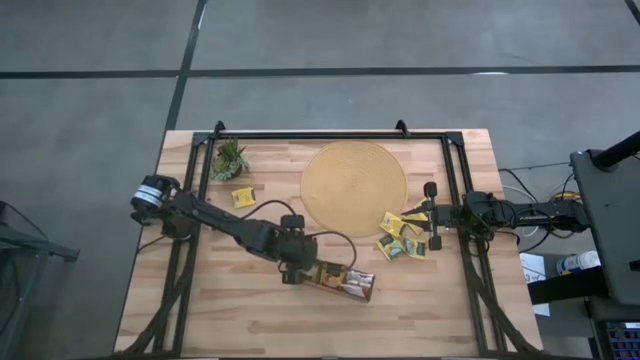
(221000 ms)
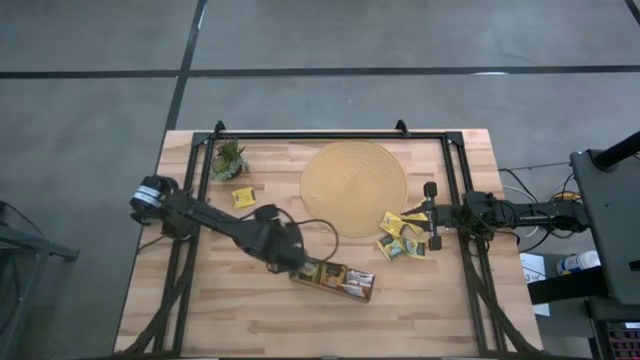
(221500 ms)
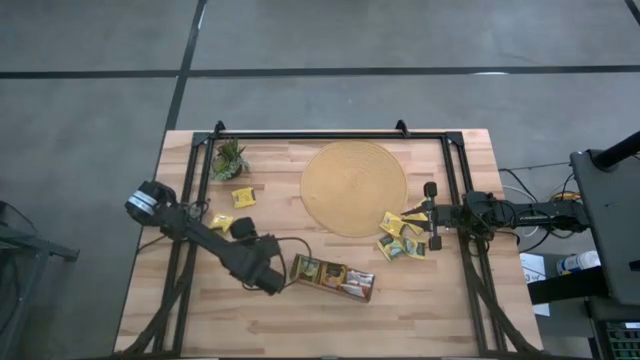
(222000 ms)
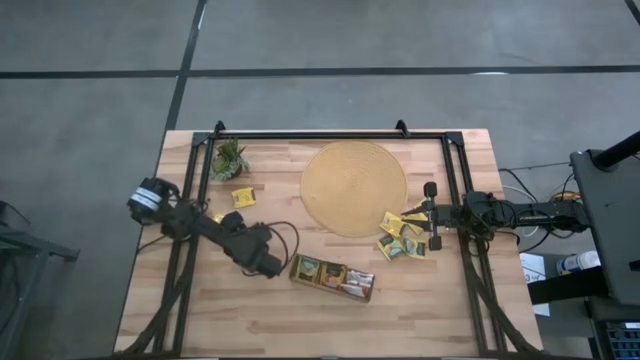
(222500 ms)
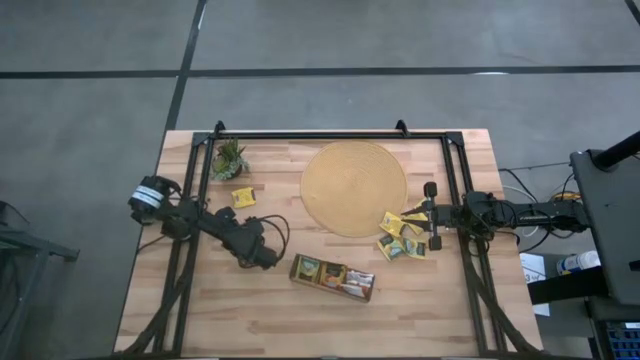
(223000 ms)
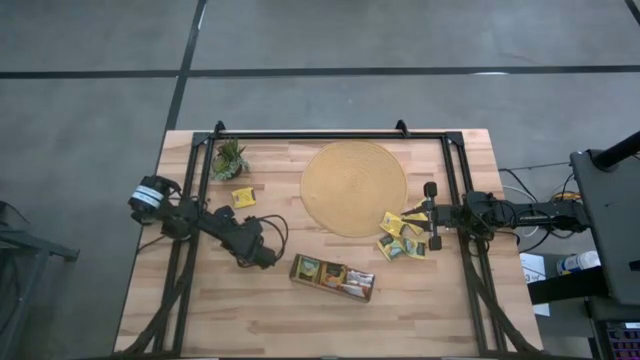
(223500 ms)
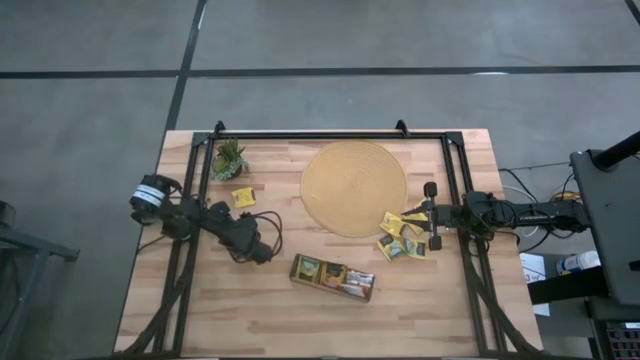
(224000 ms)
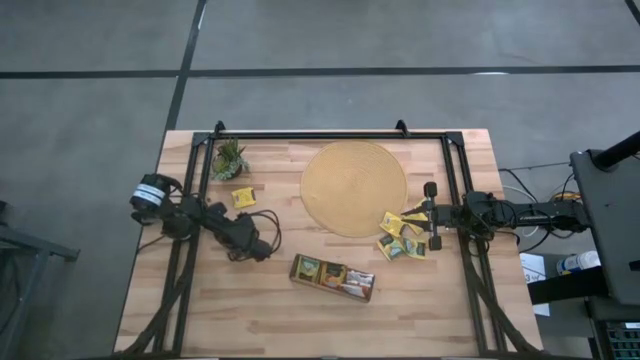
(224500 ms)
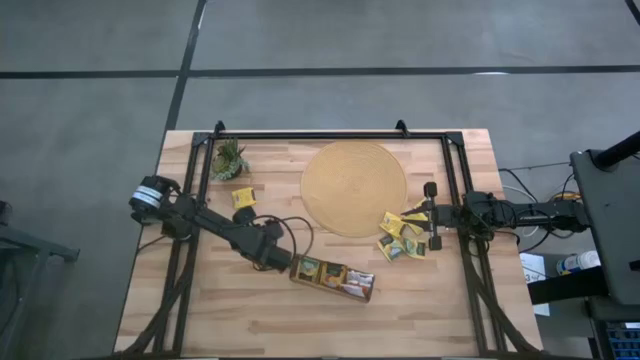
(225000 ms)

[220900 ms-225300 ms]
Task: Pick & Place Tea
Put the yellow tea bag into the left section of the wooden organizer

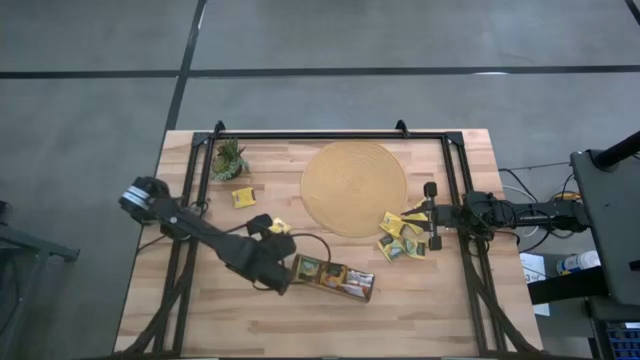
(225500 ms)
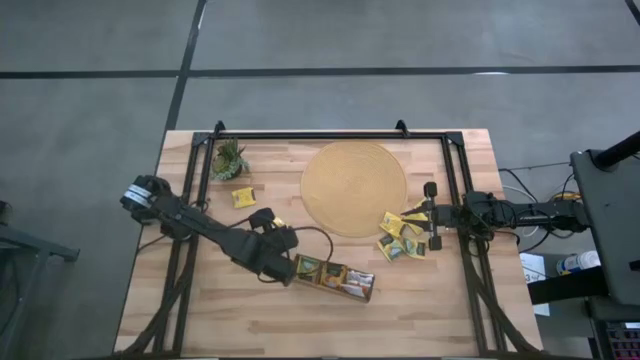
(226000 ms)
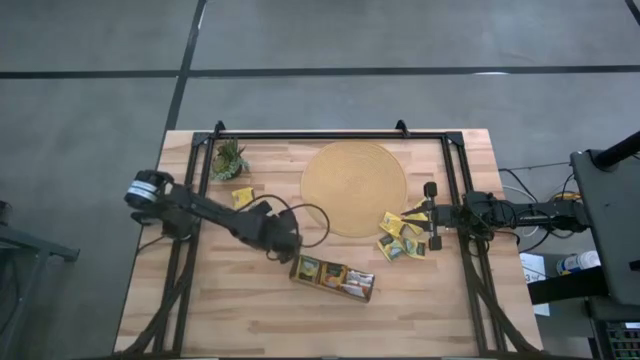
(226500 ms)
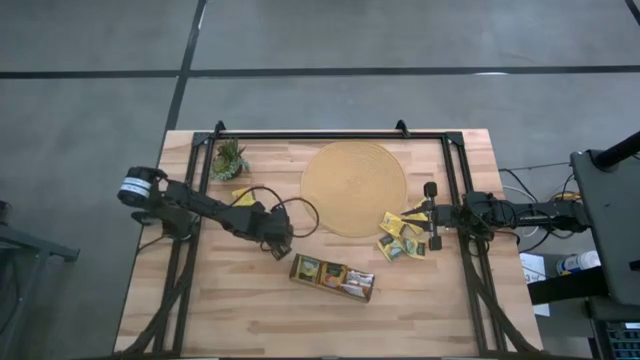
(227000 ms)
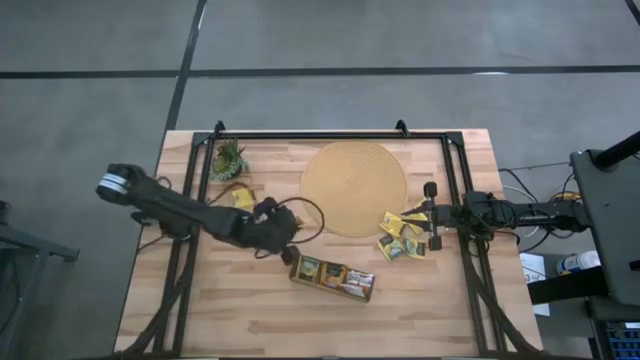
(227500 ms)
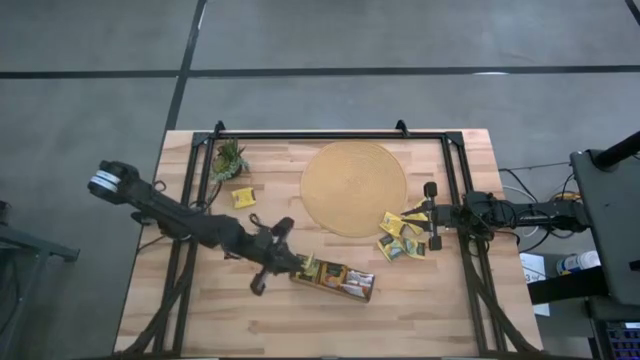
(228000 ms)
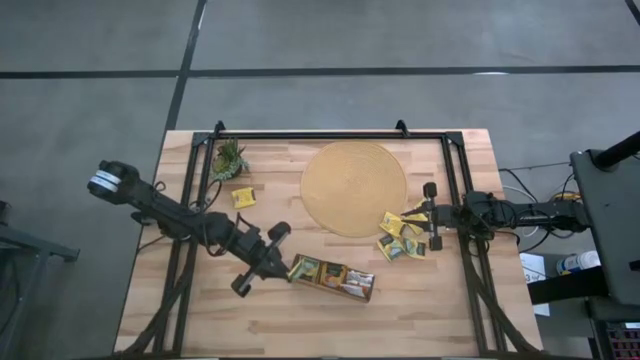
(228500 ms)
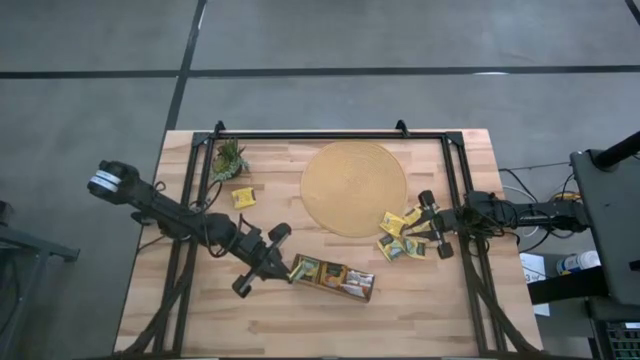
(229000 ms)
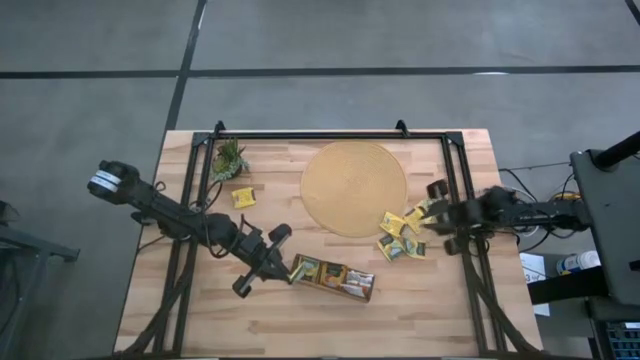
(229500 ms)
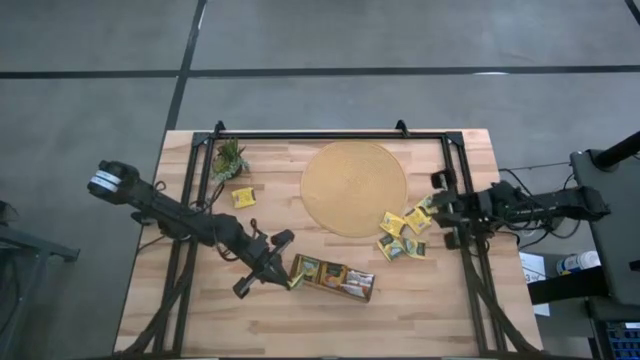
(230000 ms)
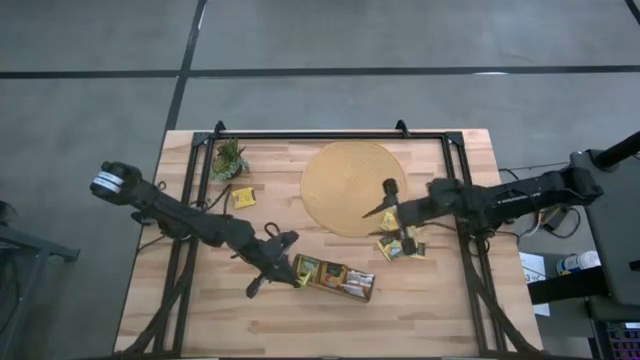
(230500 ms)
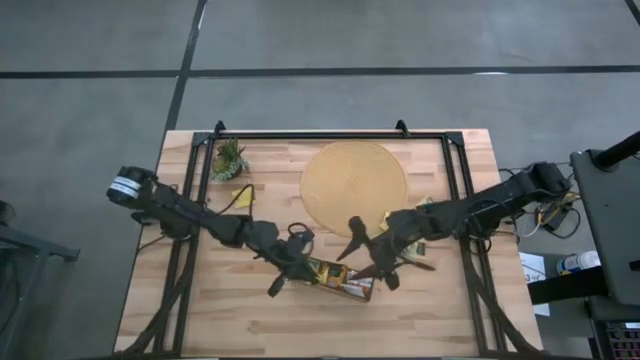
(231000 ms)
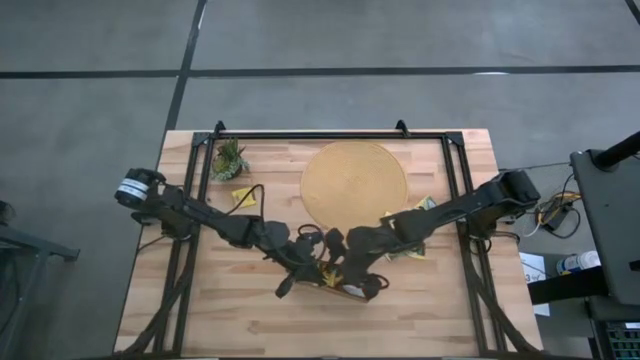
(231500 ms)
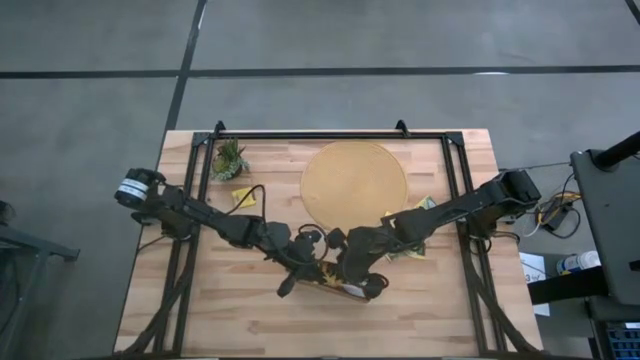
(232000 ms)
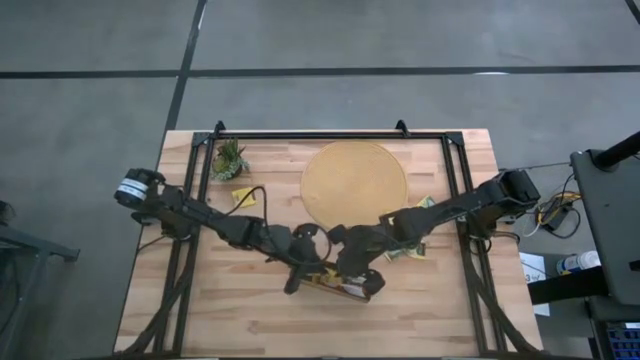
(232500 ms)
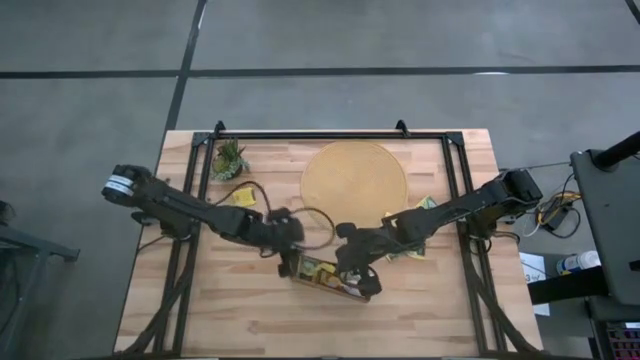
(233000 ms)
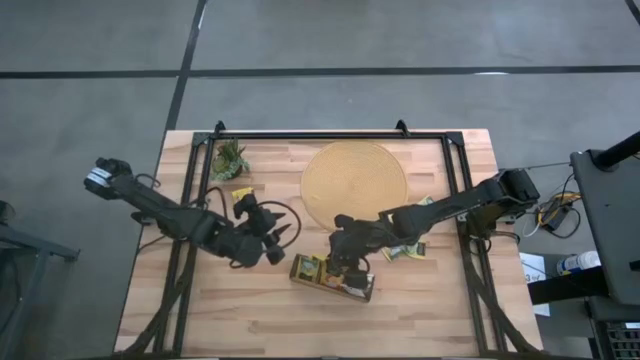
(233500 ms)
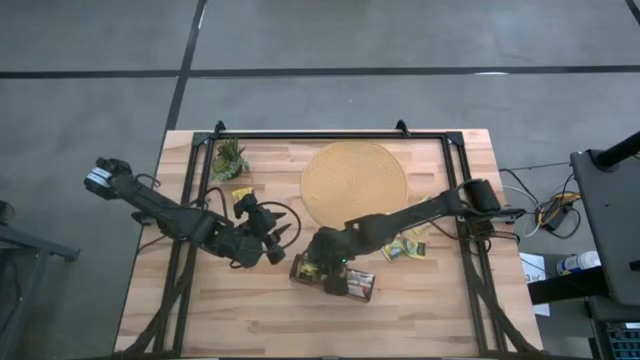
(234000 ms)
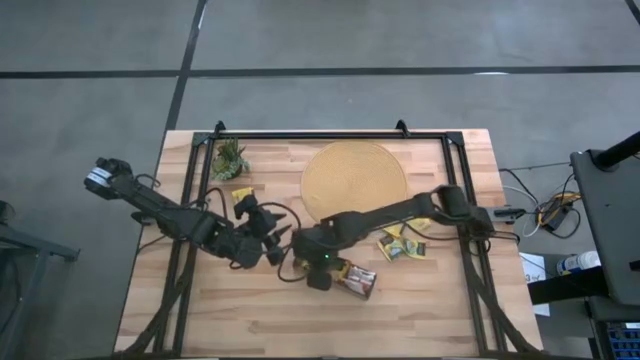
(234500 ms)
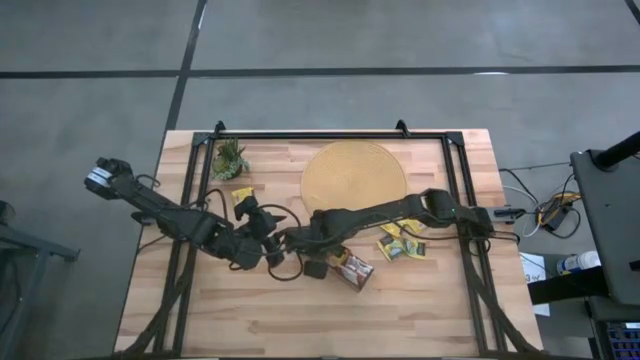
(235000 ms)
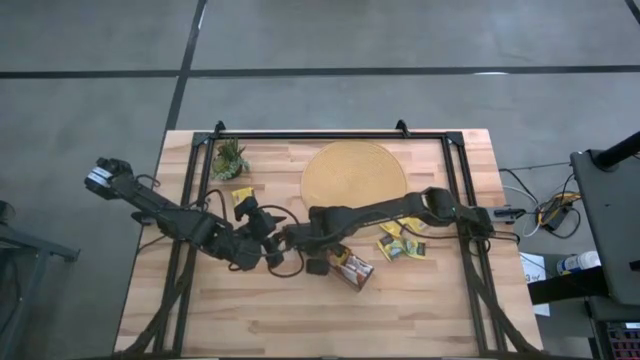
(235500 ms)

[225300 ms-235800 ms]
Put the yellow tea bag into the left section of the wooden organizer

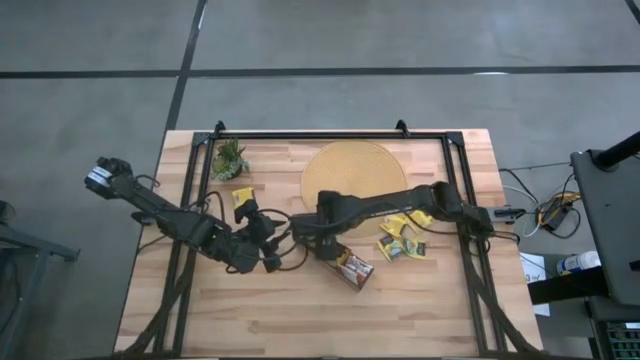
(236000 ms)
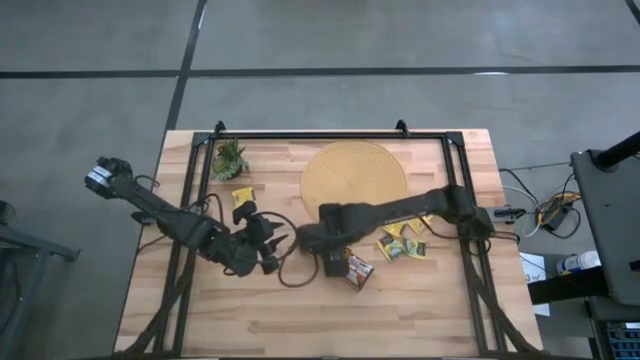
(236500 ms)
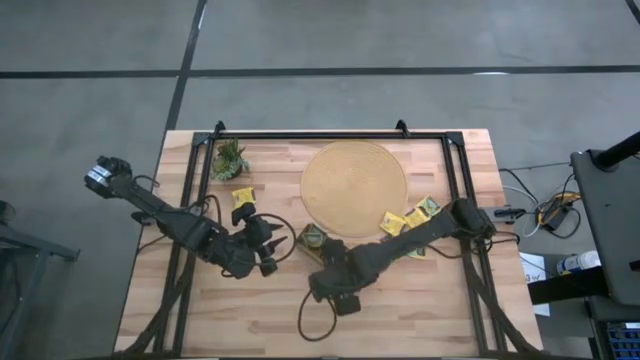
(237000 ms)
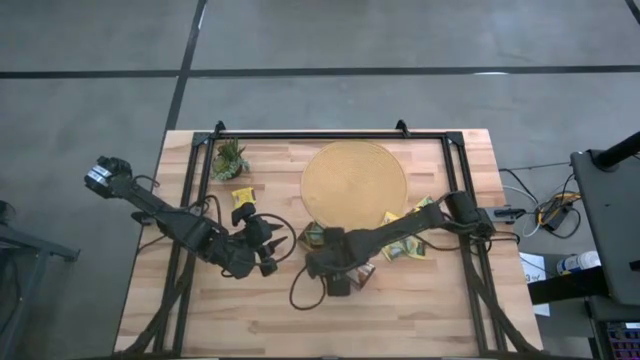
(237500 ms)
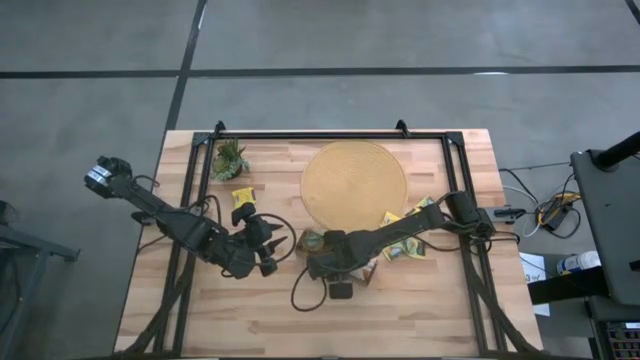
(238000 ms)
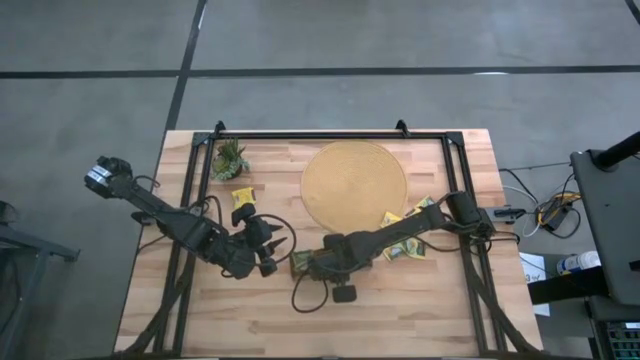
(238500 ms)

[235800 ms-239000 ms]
Adjust the the wooden organizer
